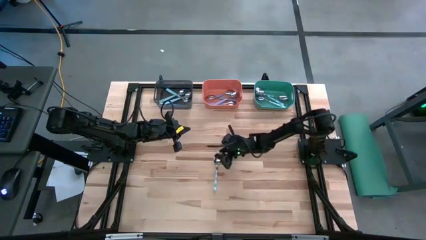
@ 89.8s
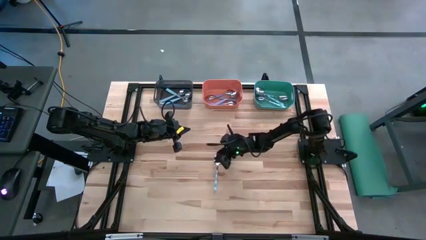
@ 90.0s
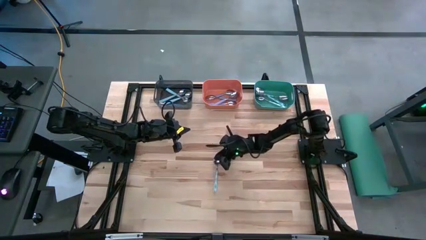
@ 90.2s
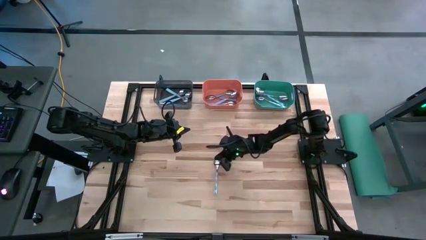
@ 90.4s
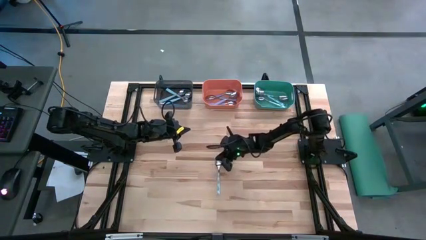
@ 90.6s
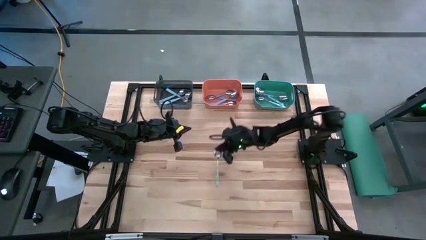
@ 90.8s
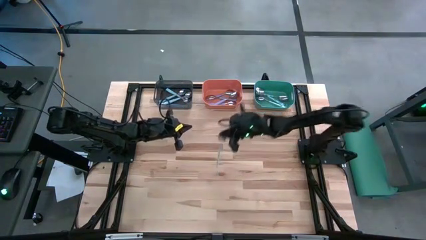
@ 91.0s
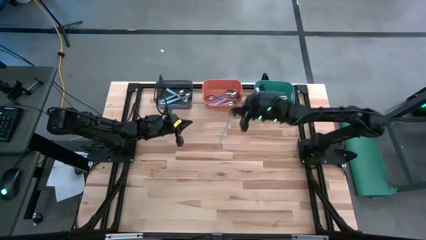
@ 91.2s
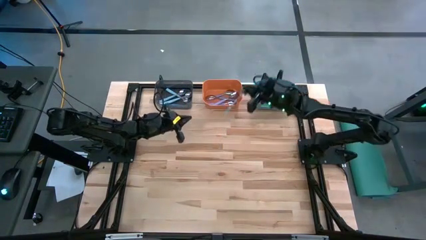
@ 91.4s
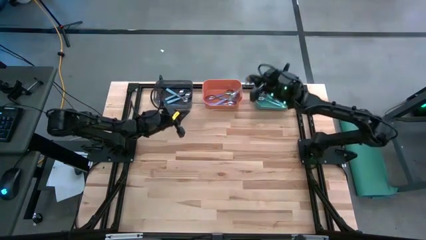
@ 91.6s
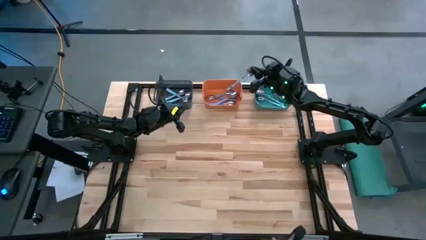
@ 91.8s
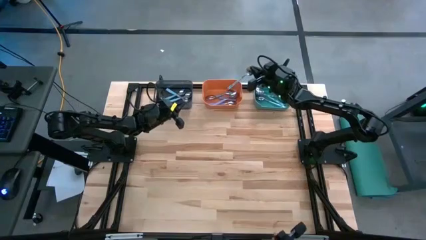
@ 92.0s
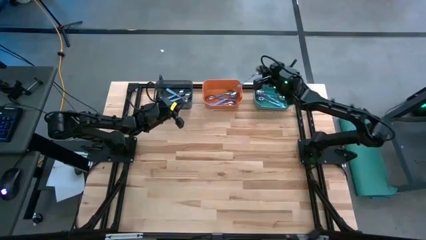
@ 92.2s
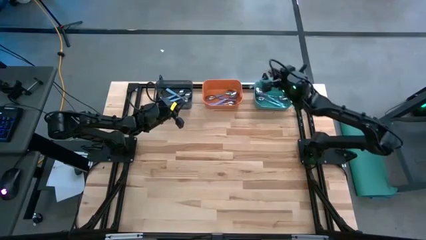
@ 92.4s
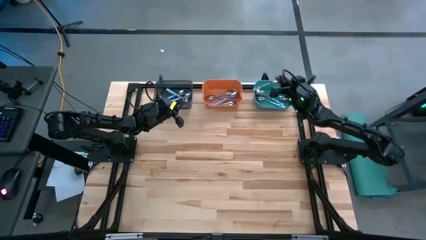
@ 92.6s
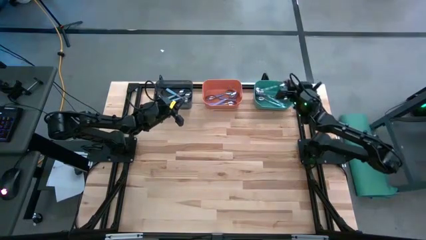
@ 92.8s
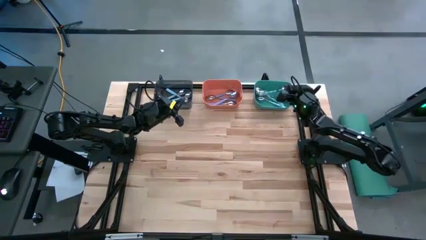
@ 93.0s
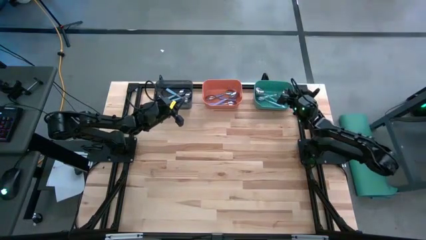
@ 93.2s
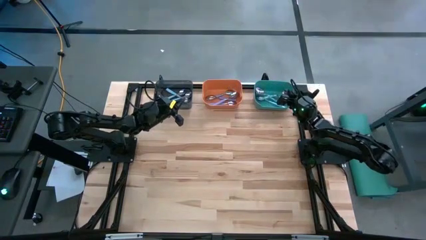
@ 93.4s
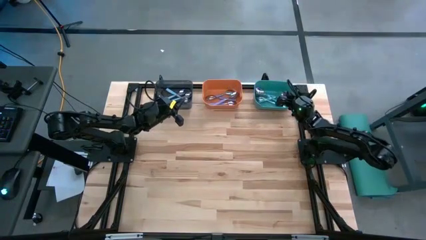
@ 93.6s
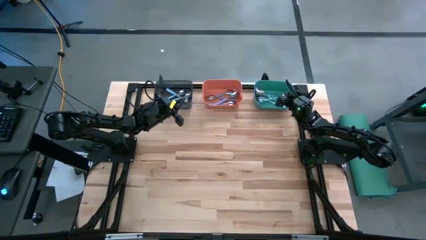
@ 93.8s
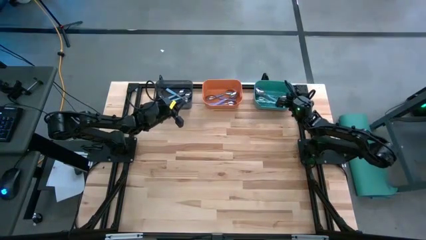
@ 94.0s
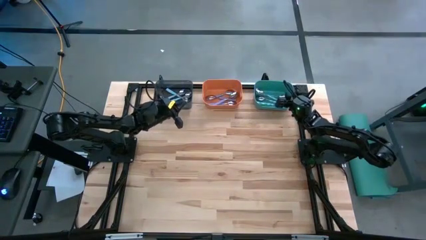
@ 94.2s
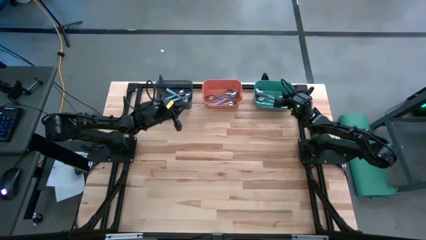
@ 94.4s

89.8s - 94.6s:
Task: Sort silverware by color (type)
Put the blue patterned spoon into the green bin

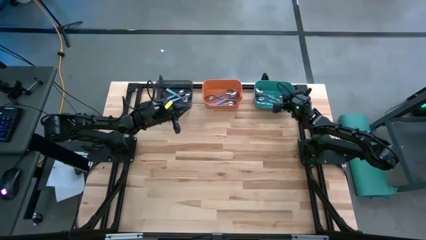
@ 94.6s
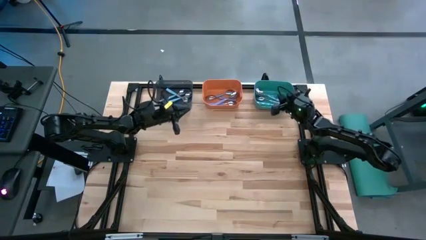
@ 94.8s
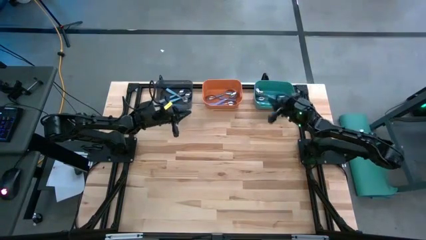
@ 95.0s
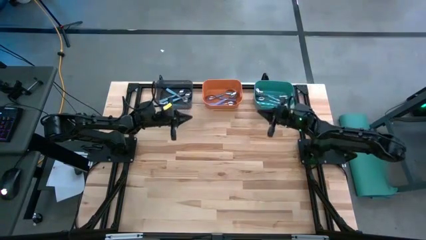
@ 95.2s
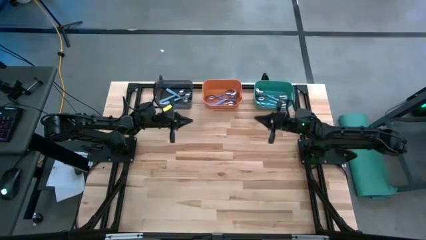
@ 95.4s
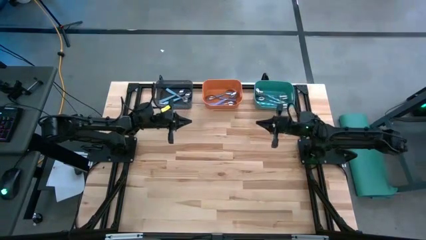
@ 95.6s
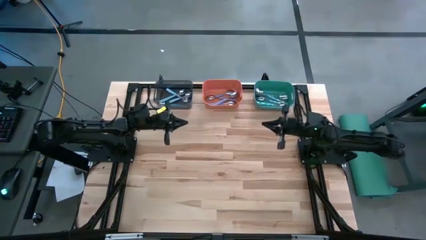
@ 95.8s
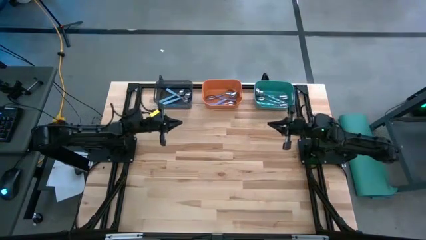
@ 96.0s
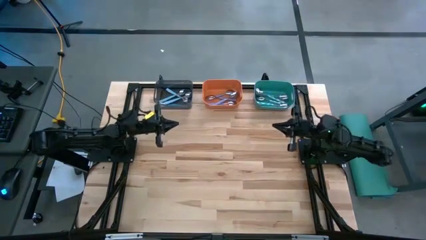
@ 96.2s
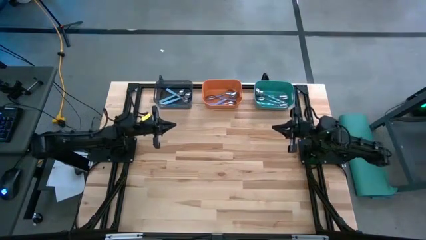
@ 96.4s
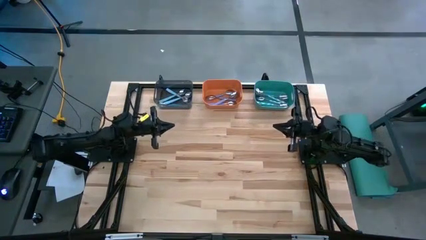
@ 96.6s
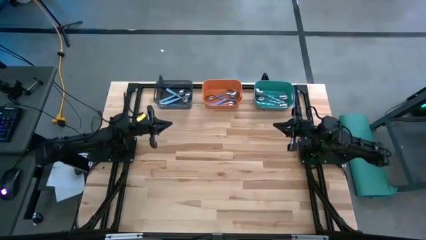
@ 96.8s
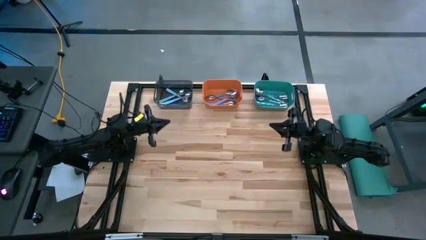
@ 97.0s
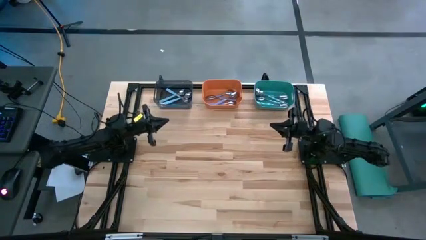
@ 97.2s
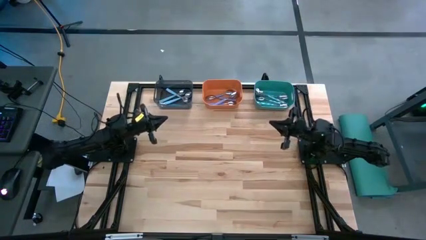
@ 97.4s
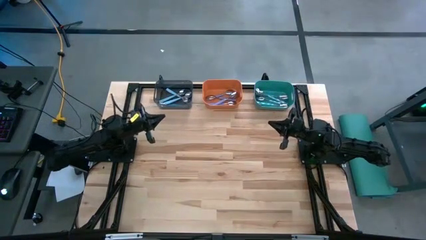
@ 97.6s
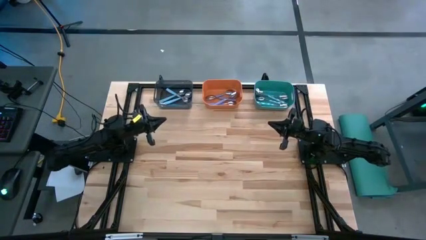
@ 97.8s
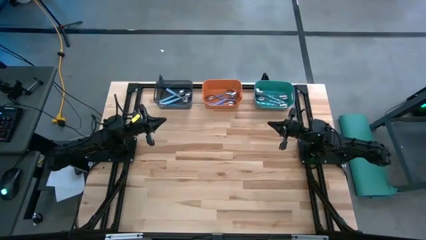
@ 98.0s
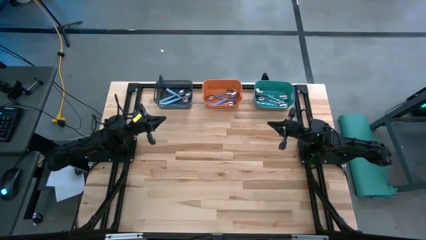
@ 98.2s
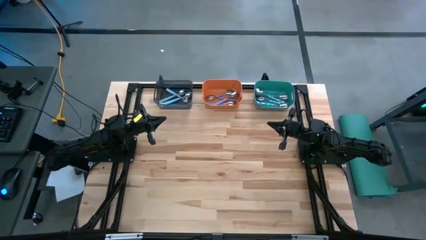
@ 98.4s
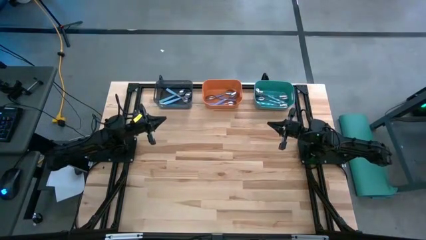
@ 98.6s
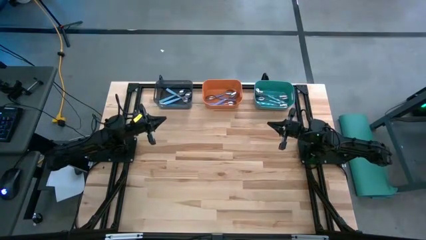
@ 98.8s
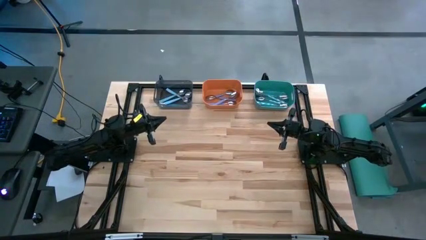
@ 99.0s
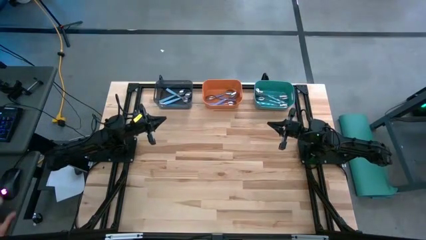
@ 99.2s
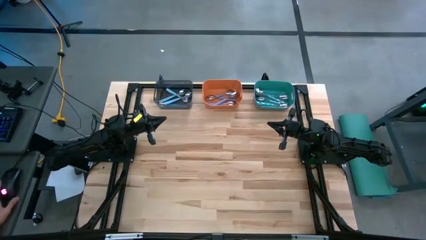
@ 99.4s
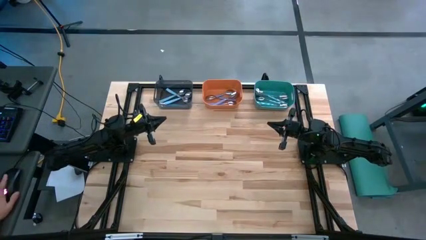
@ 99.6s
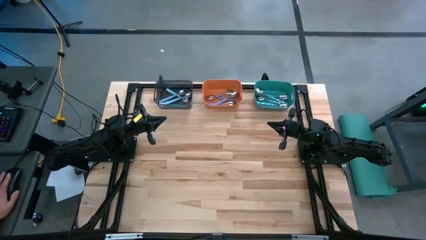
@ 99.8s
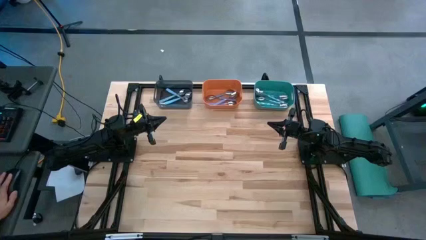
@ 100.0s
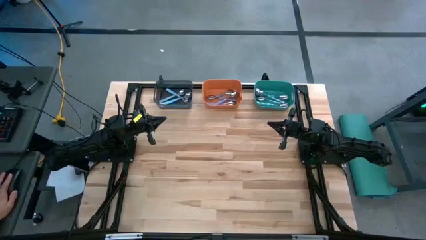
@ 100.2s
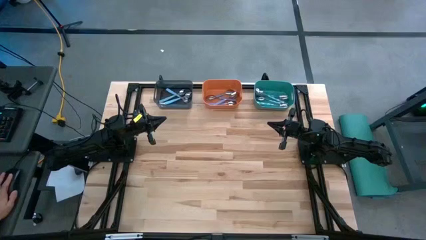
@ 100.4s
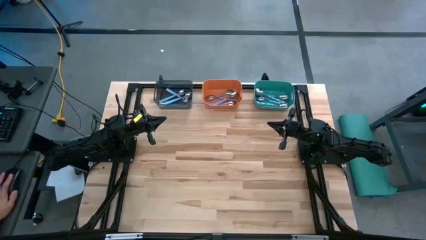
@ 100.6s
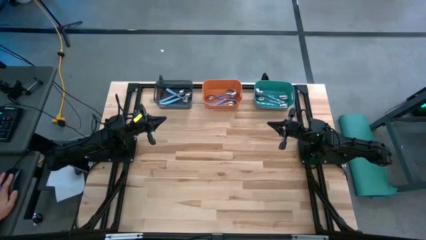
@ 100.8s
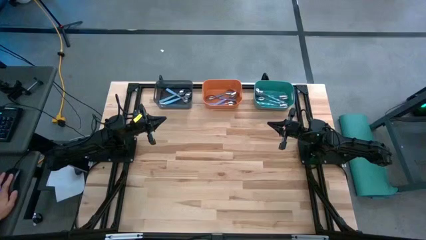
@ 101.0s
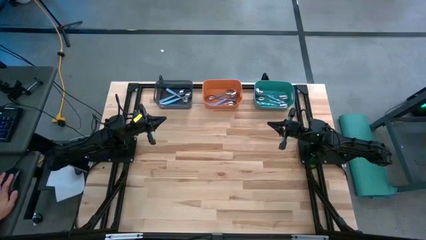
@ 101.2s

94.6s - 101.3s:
Return to Home Position

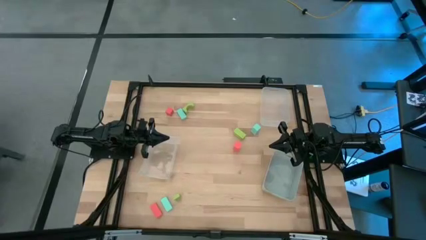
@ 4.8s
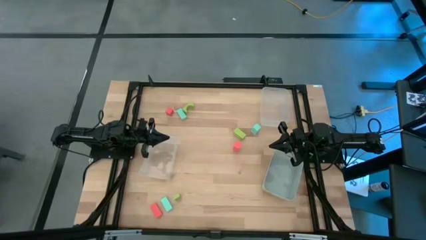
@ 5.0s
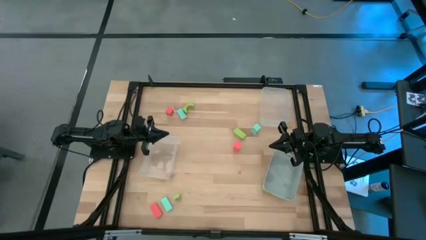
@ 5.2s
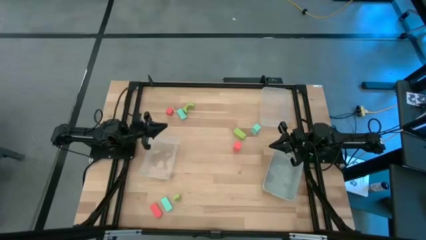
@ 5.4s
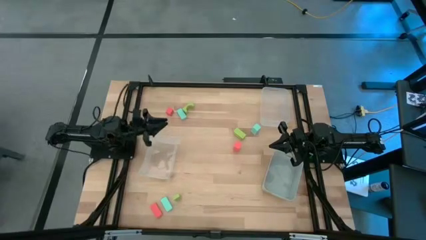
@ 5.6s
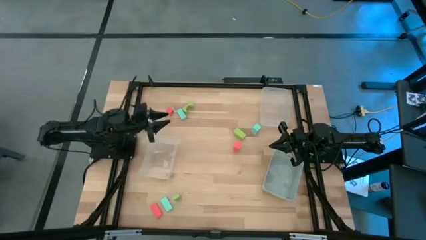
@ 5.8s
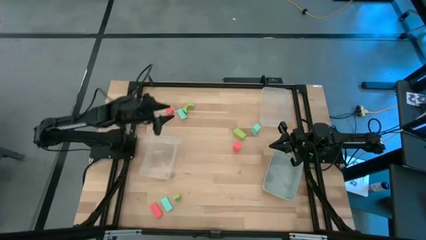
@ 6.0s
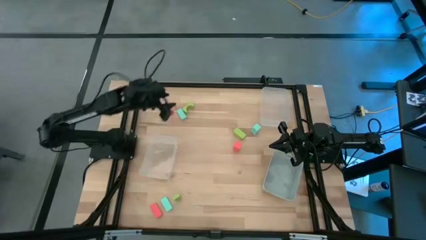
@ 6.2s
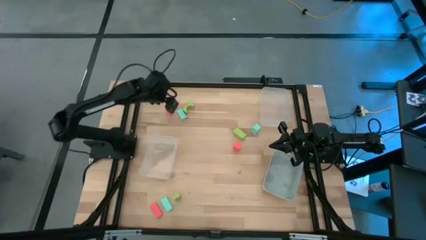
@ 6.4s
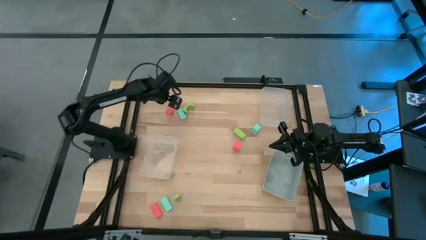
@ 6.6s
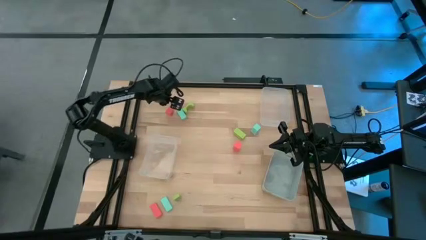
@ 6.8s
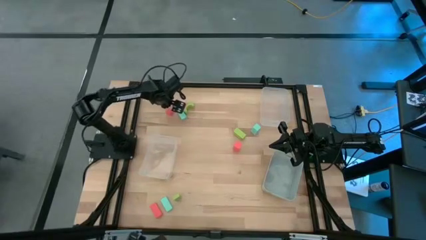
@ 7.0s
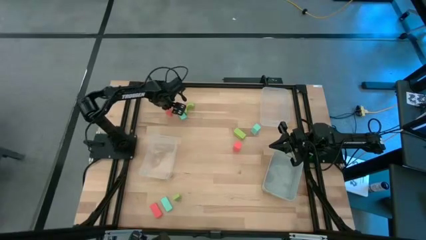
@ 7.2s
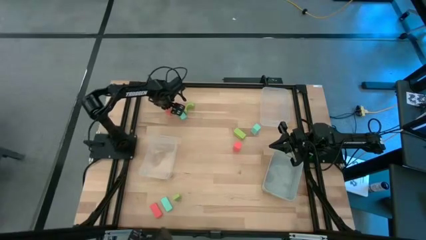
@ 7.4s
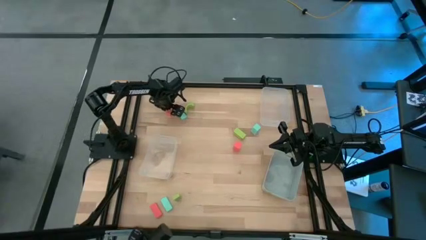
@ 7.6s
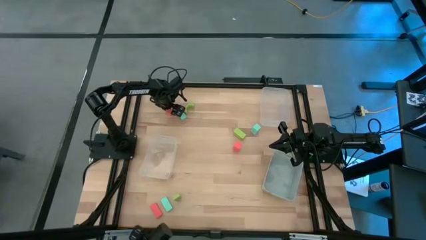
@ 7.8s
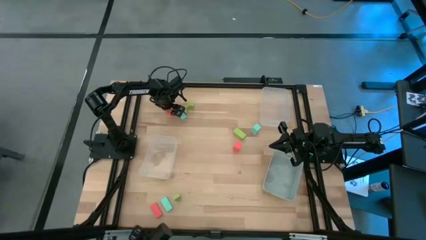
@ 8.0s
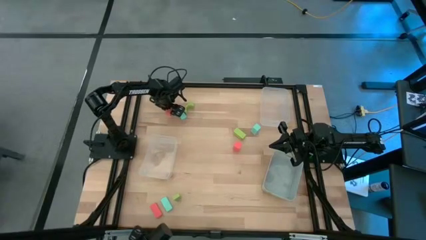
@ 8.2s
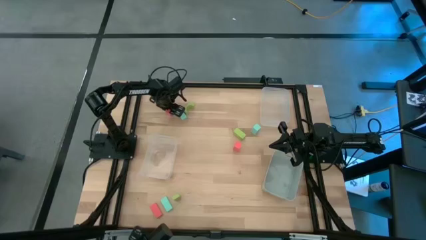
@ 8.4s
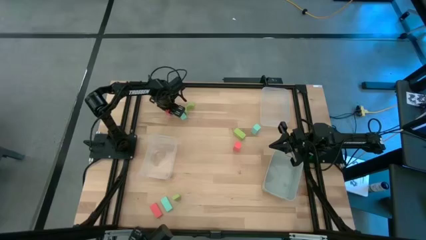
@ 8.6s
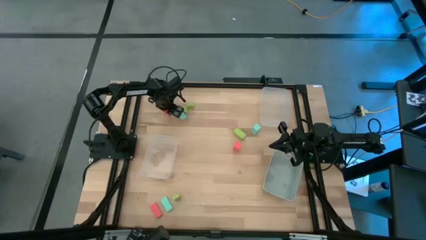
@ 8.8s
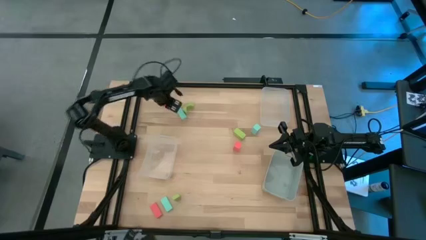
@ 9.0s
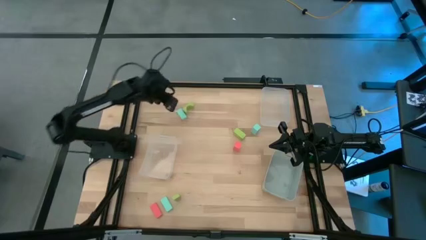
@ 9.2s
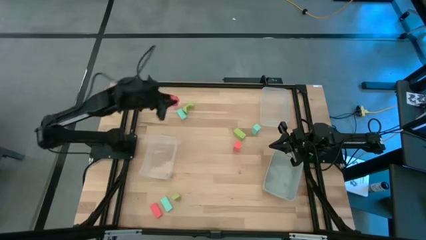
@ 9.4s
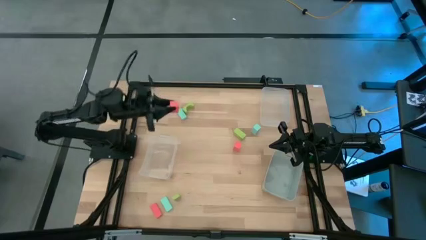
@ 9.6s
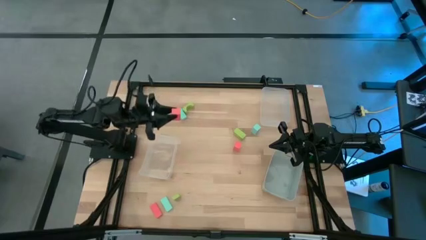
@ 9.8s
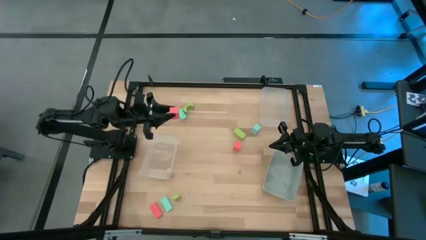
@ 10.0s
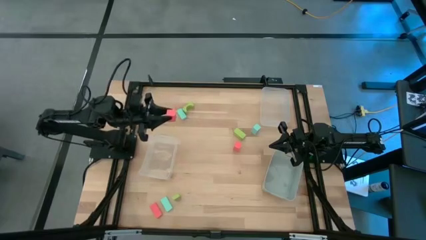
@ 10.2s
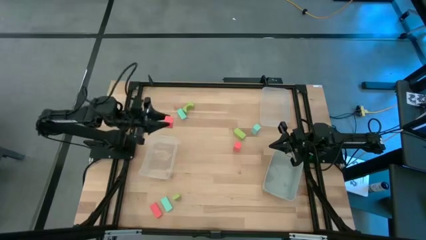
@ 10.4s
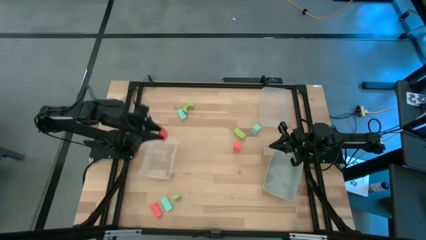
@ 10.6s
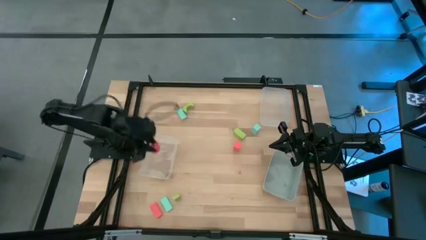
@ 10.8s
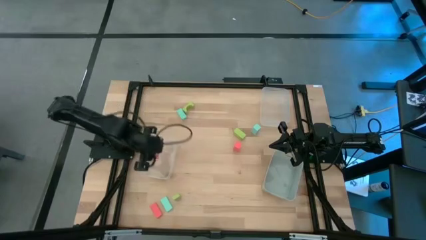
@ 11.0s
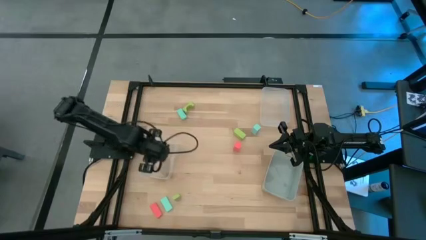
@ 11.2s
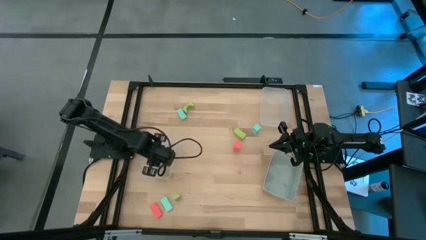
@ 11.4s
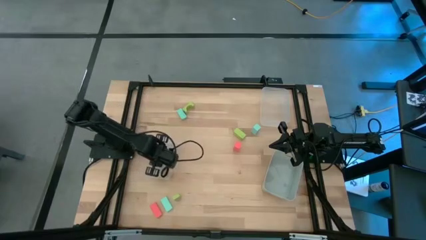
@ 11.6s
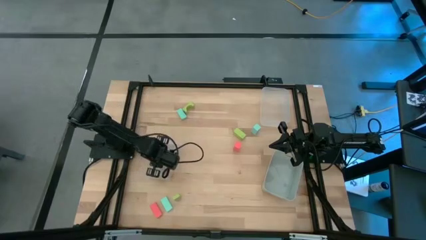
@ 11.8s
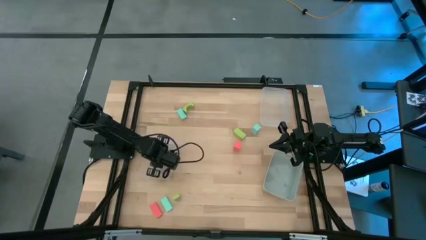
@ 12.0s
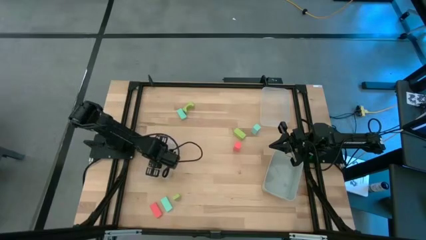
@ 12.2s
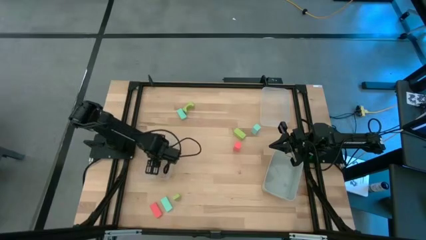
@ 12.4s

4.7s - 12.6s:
Task: Sort & place blocks by color
Put the top orange block into the bottom transparent bin
